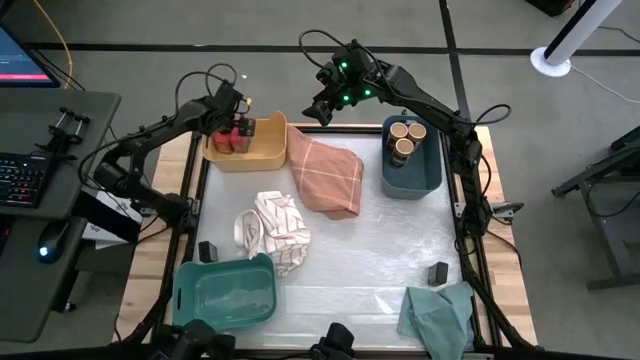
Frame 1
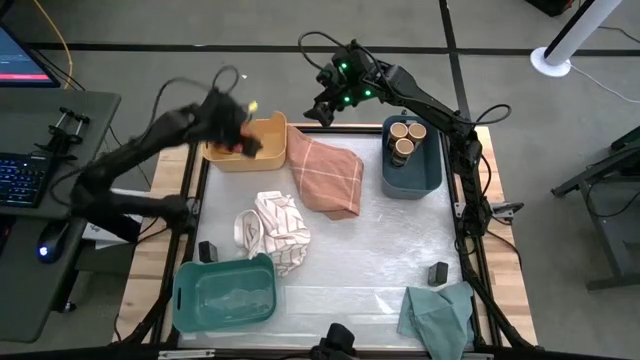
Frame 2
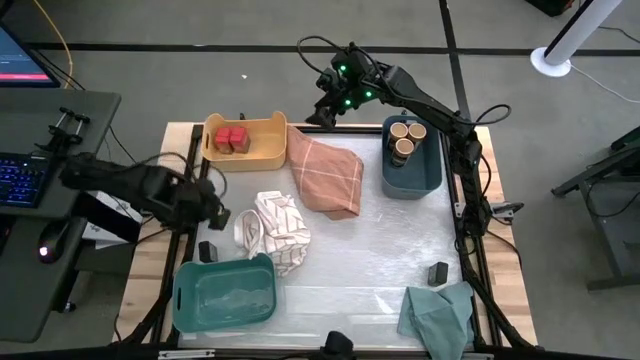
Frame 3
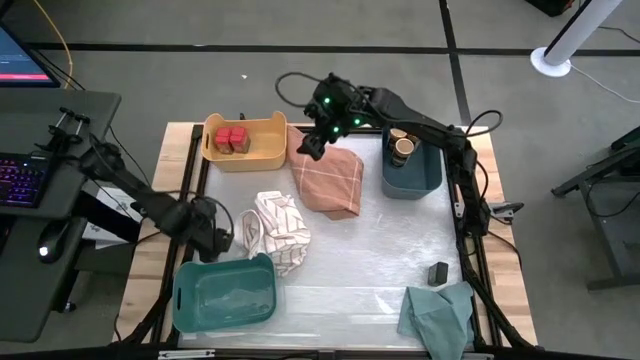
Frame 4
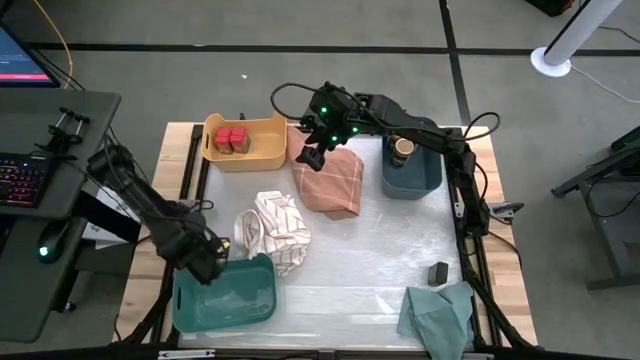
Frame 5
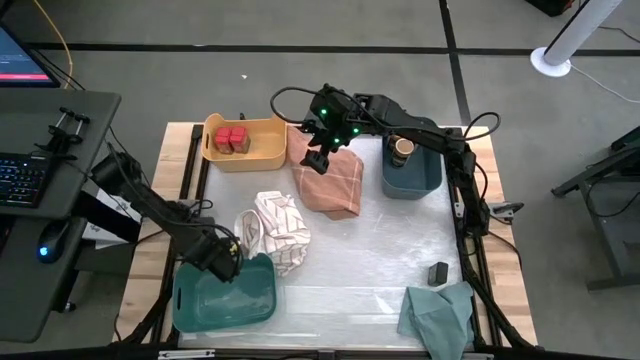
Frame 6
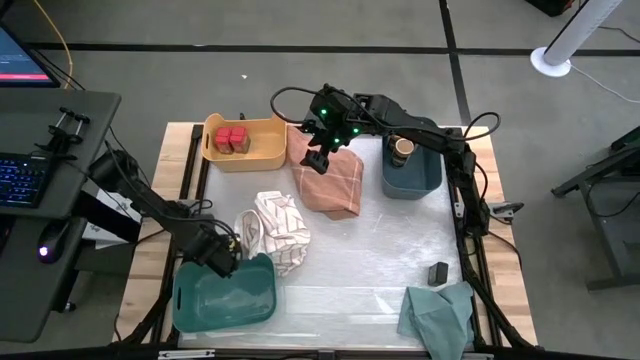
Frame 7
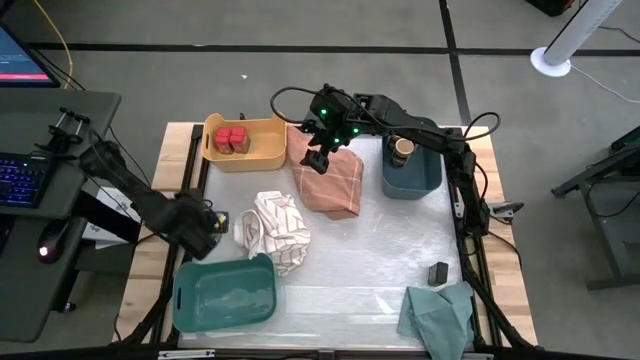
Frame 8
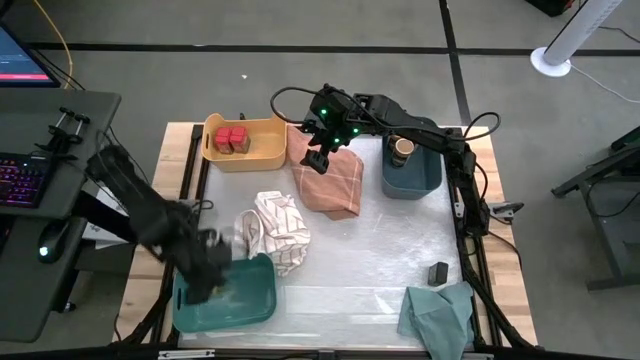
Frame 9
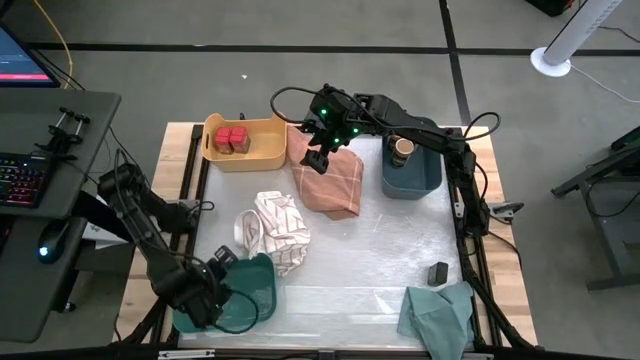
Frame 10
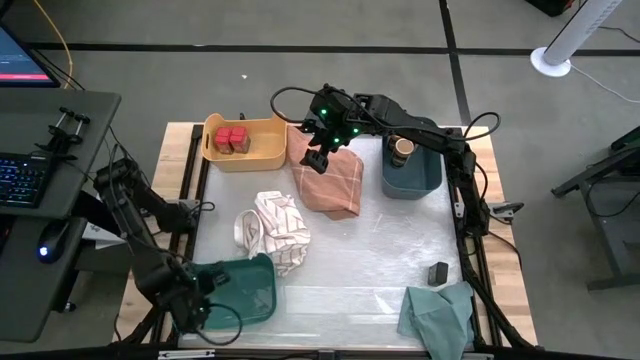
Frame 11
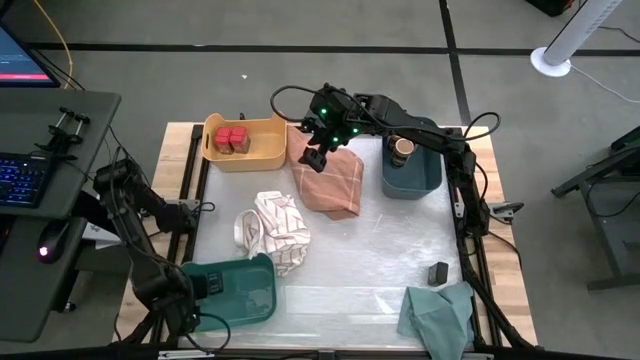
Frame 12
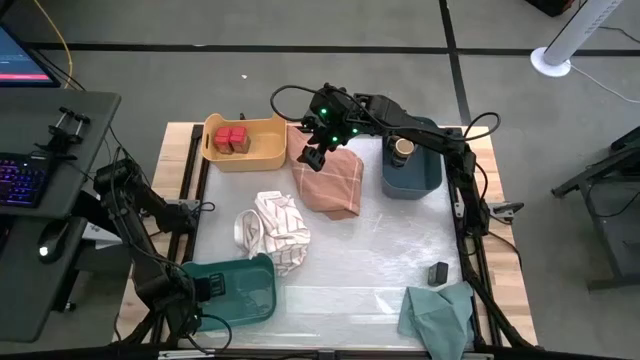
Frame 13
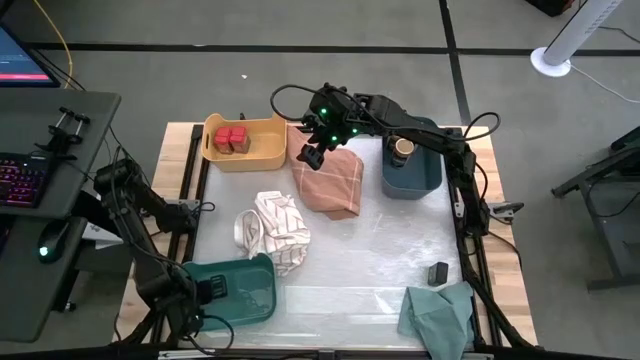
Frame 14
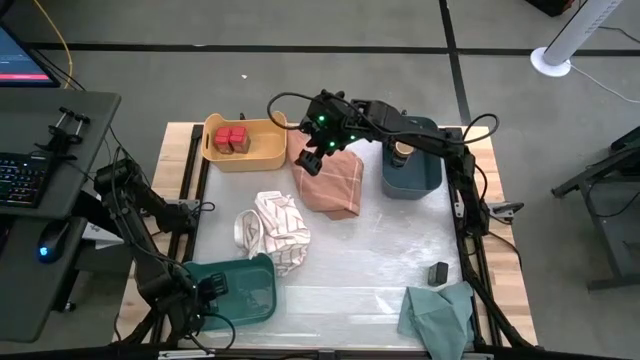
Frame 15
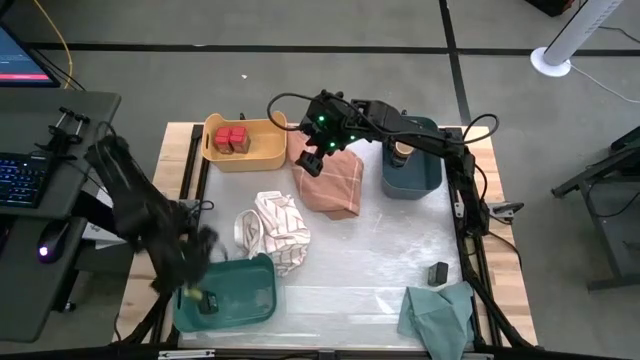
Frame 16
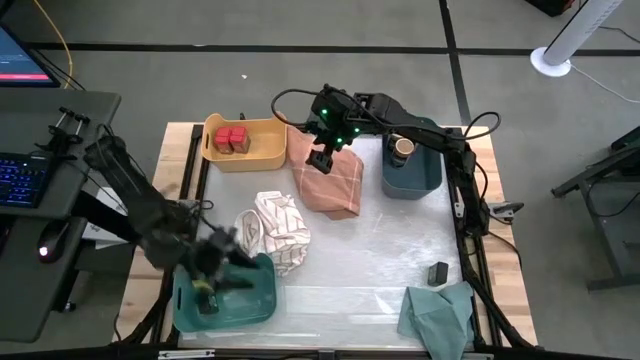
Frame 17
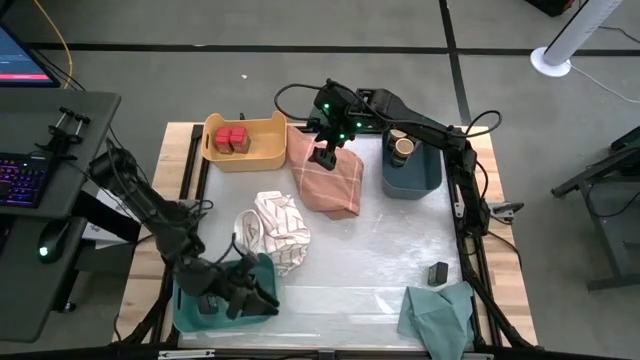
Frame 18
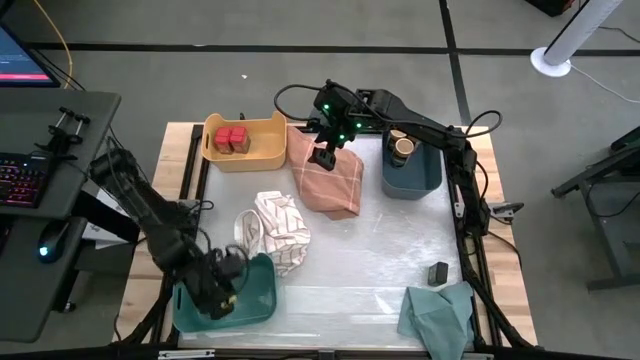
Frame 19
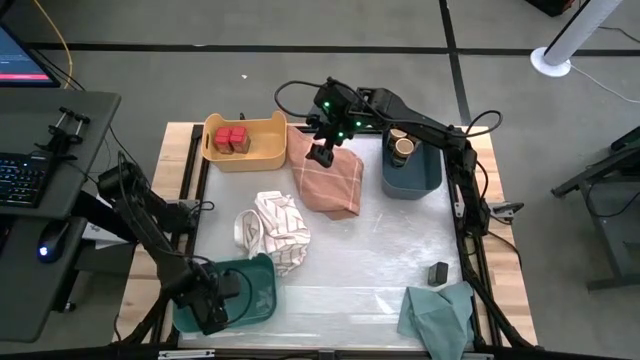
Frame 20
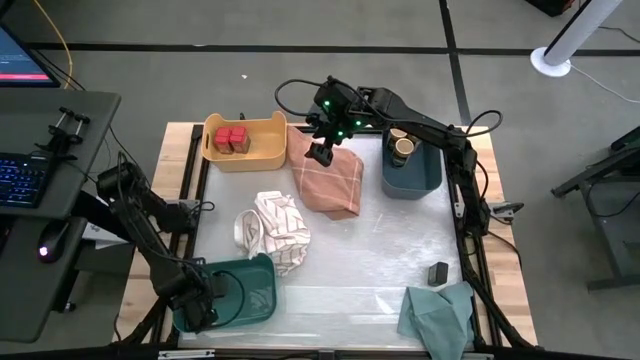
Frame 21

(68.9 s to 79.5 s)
Task: Sort spices by type
Put the left black seasoning can into the green bin

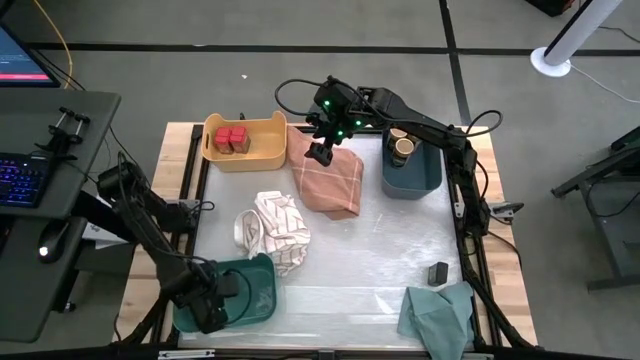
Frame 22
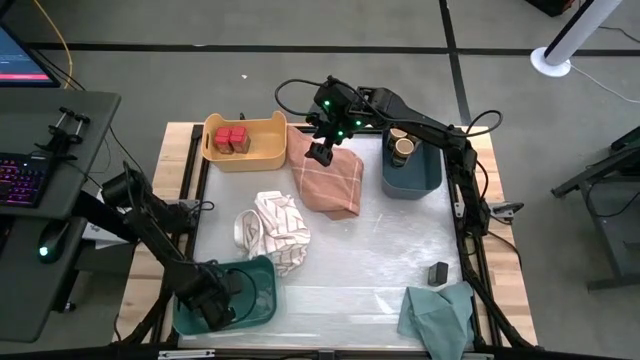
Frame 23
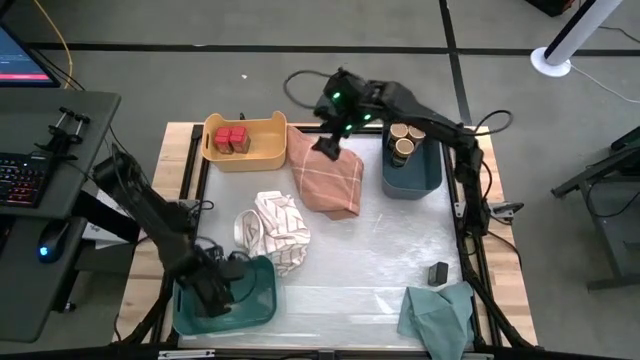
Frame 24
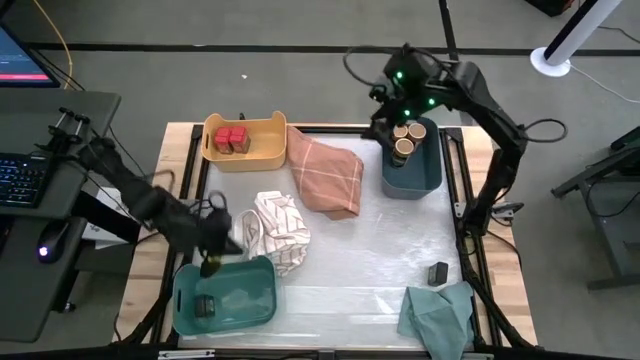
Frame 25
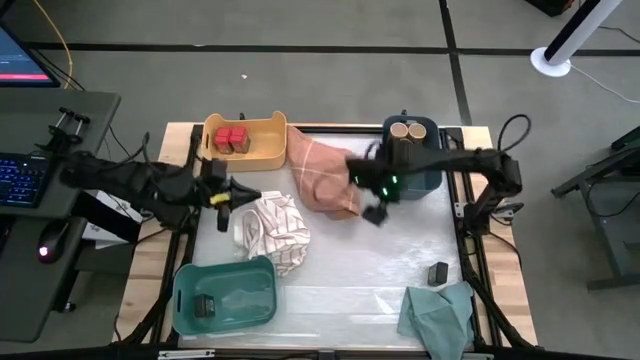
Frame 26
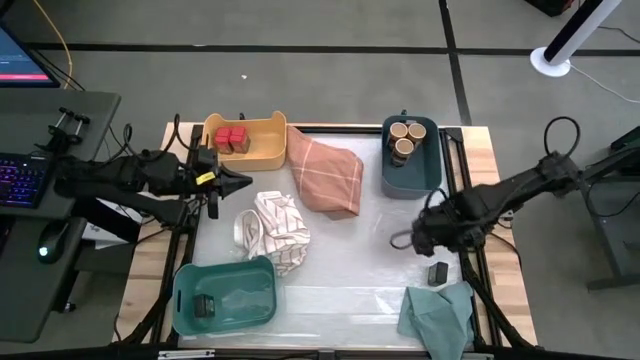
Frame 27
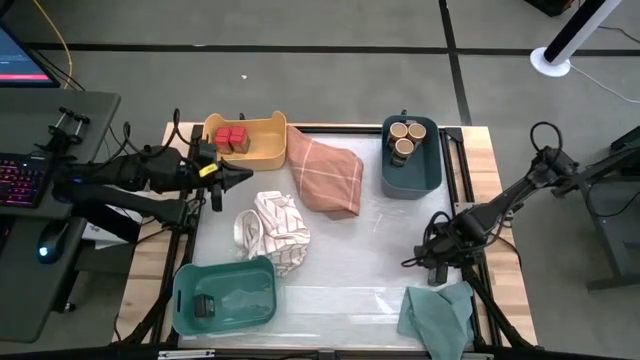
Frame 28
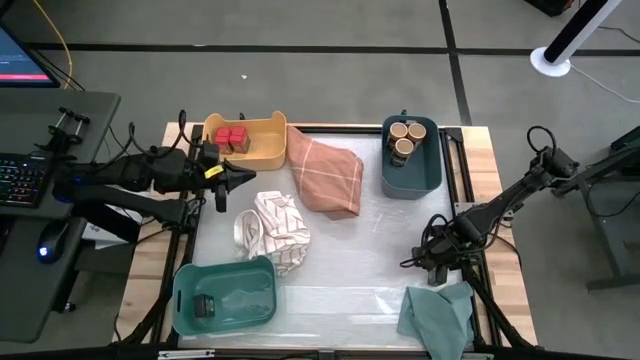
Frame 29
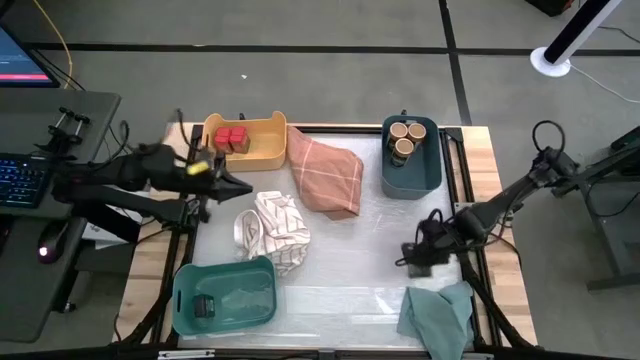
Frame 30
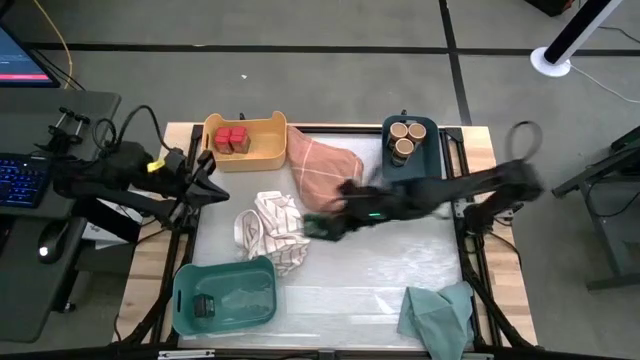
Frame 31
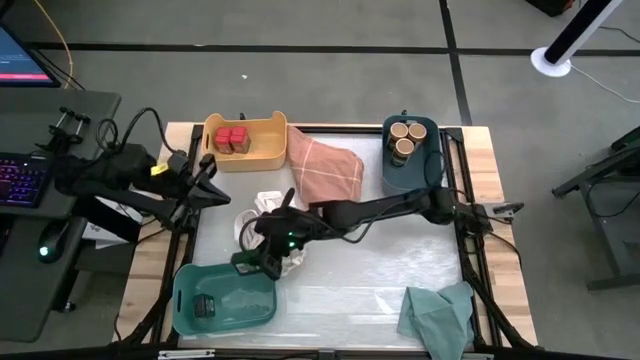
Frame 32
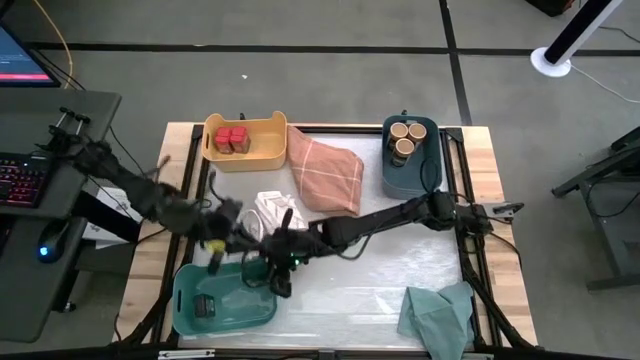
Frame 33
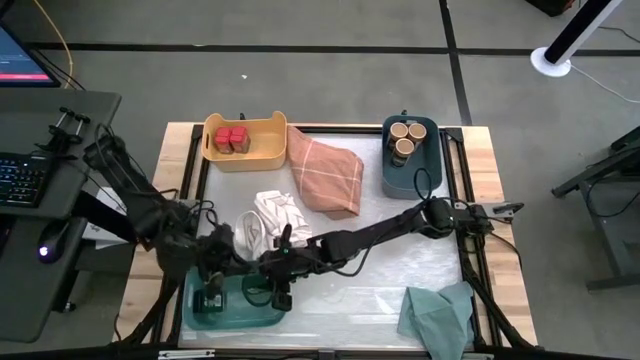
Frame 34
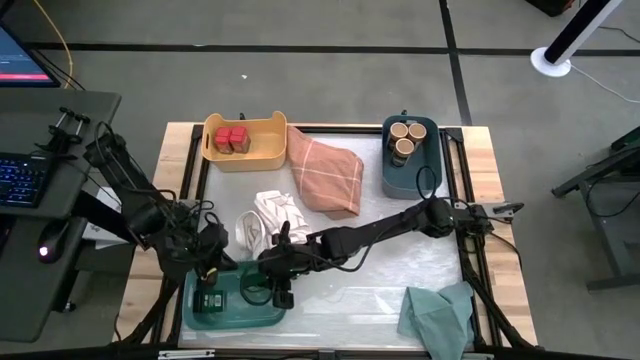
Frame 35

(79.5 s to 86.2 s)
Put the black seasoning can into the green bin

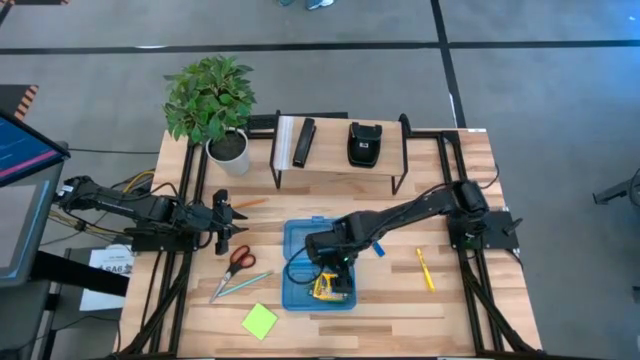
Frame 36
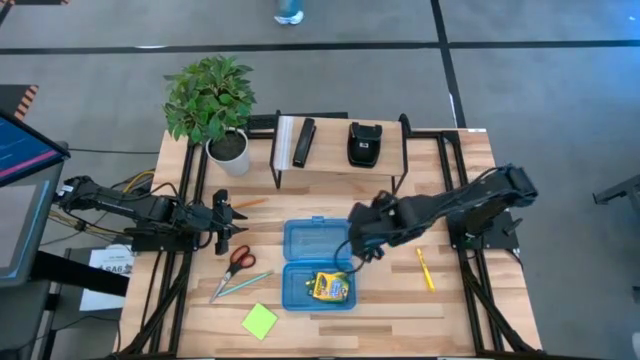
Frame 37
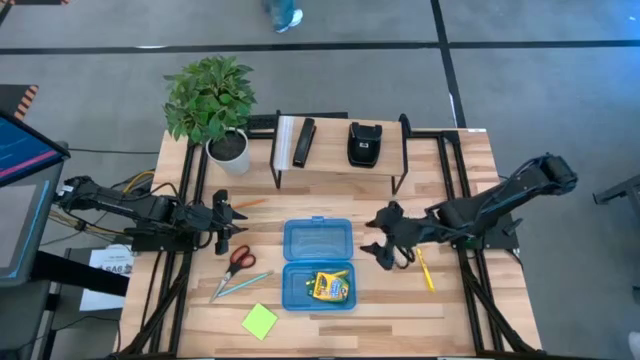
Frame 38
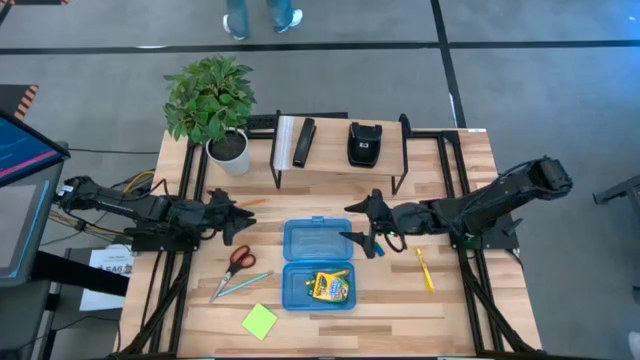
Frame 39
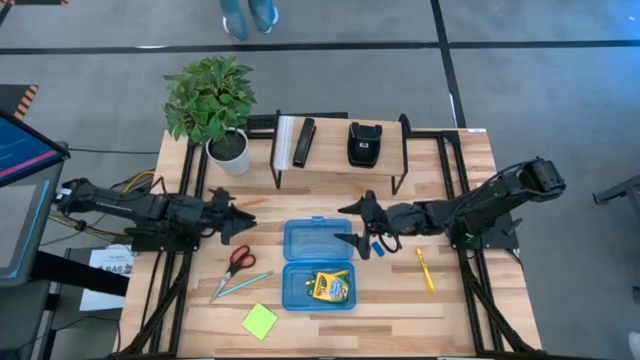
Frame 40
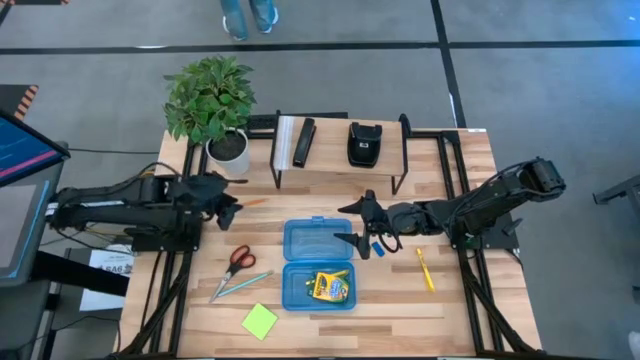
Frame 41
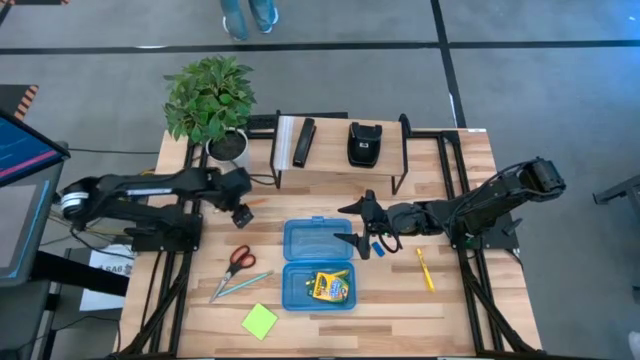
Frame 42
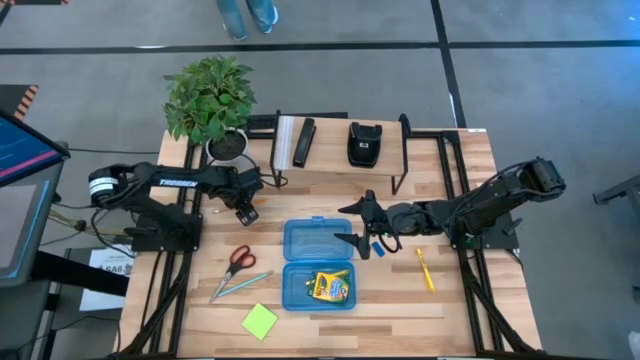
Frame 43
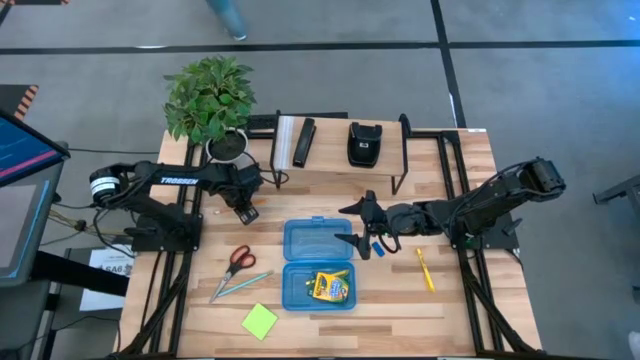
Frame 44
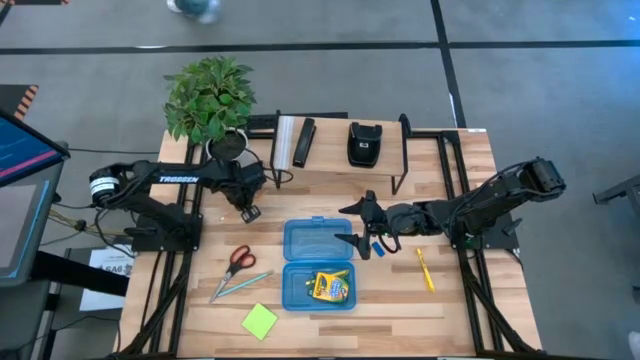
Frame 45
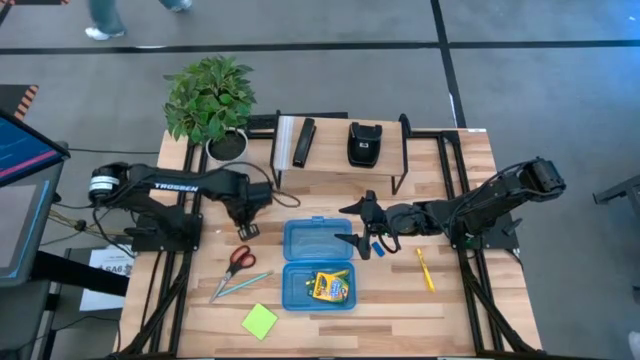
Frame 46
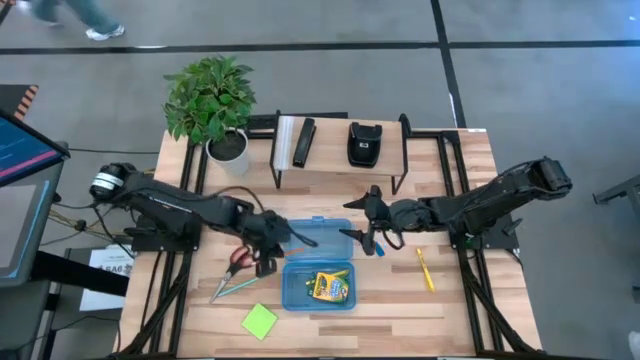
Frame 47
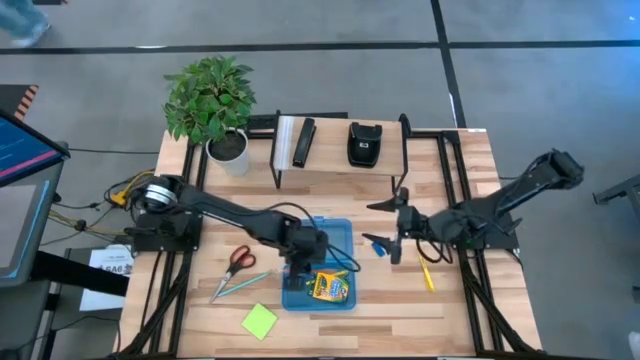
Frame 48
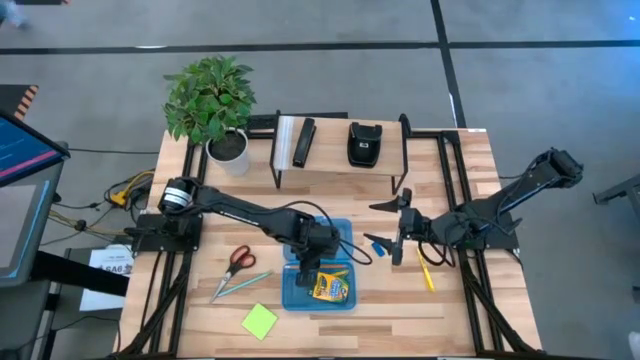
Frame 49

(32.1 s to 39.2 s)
Task: Pack school essentials
Put the orange pencil into the blue supply box
